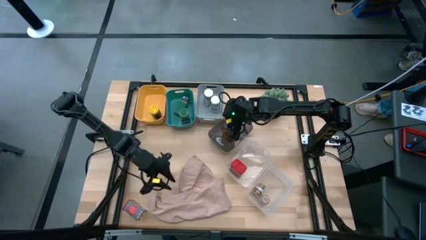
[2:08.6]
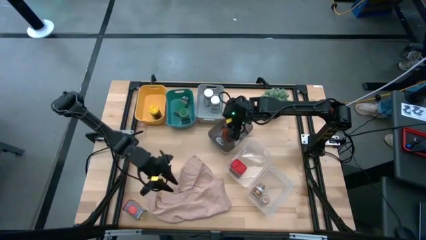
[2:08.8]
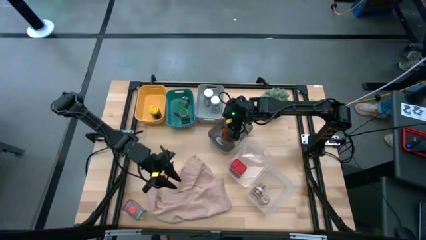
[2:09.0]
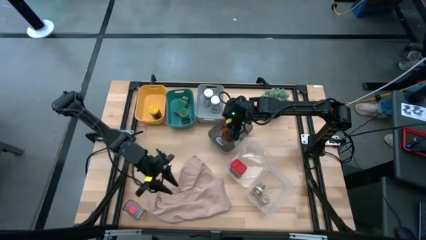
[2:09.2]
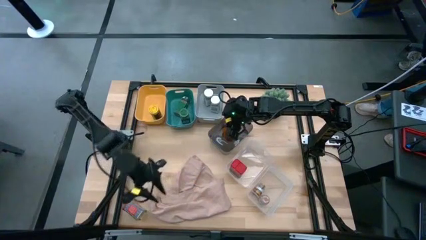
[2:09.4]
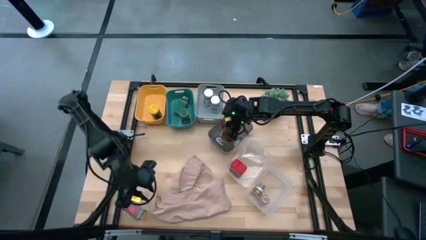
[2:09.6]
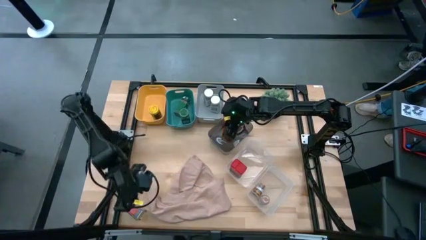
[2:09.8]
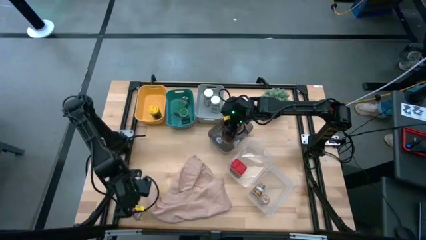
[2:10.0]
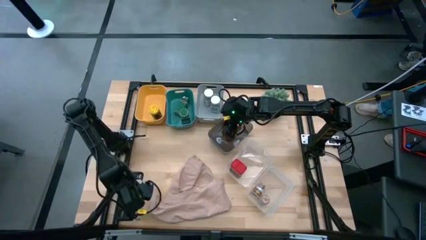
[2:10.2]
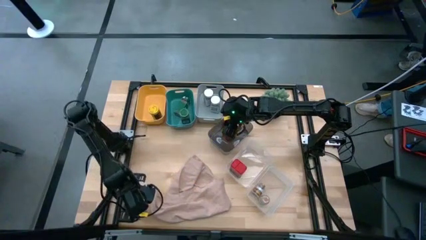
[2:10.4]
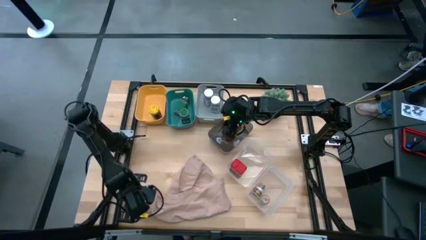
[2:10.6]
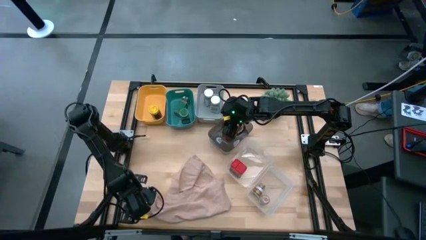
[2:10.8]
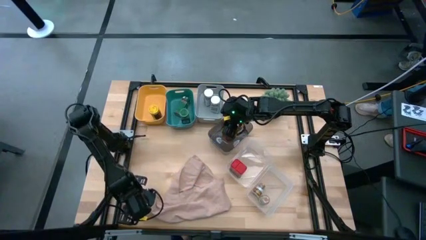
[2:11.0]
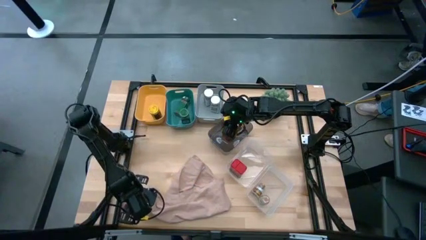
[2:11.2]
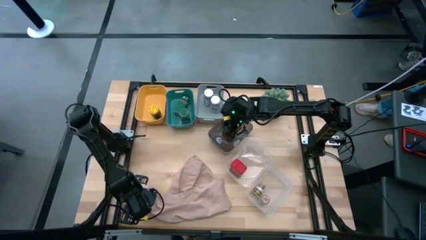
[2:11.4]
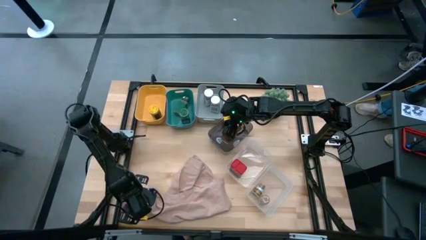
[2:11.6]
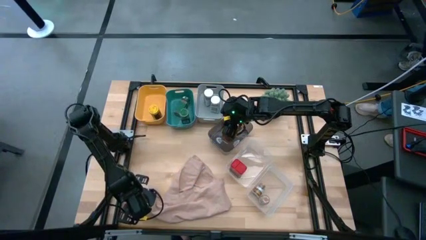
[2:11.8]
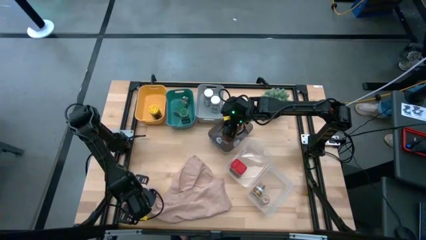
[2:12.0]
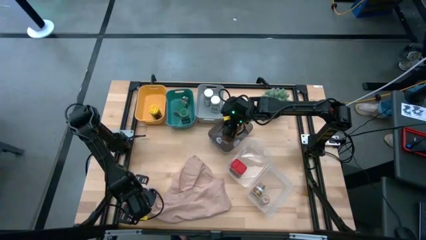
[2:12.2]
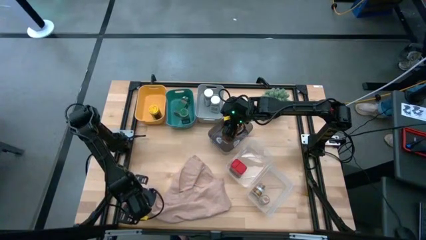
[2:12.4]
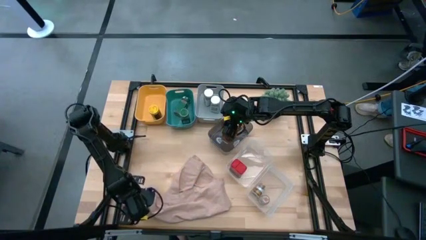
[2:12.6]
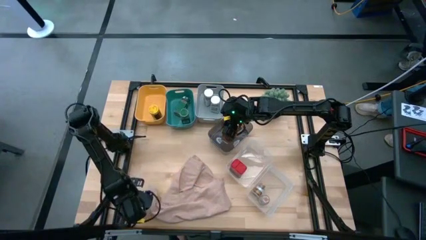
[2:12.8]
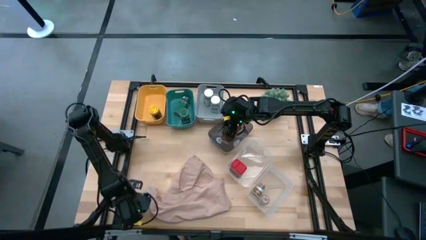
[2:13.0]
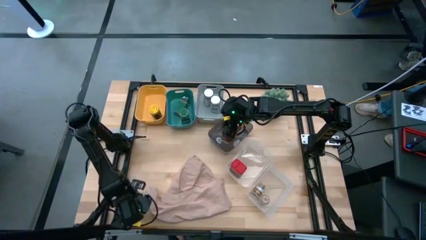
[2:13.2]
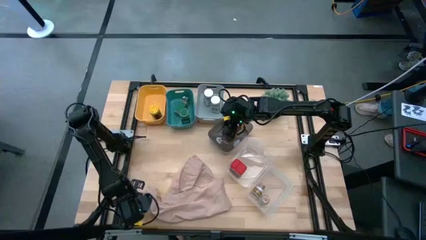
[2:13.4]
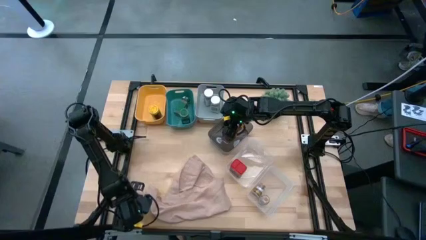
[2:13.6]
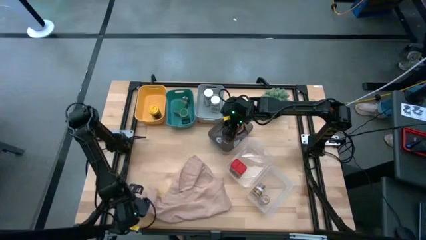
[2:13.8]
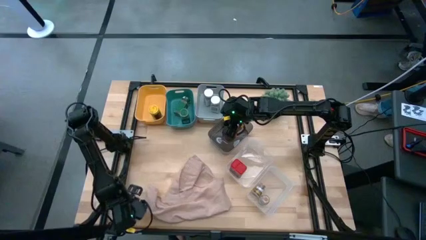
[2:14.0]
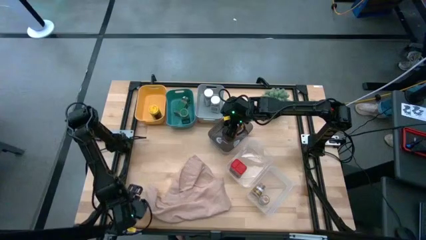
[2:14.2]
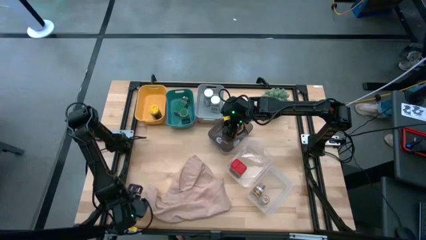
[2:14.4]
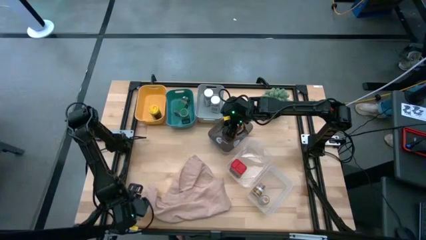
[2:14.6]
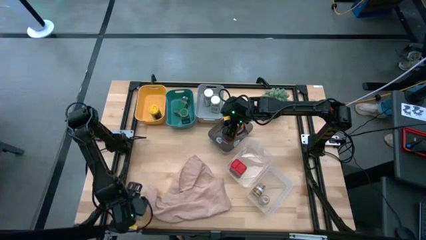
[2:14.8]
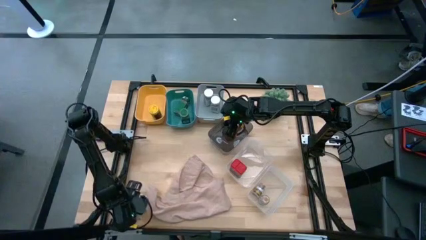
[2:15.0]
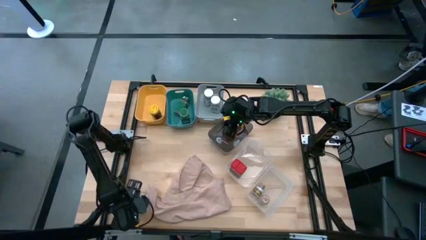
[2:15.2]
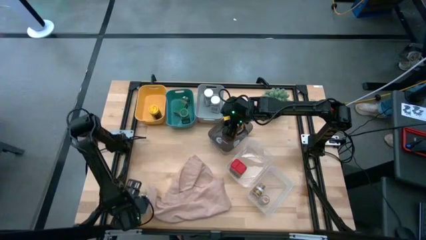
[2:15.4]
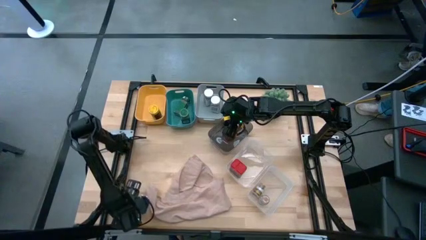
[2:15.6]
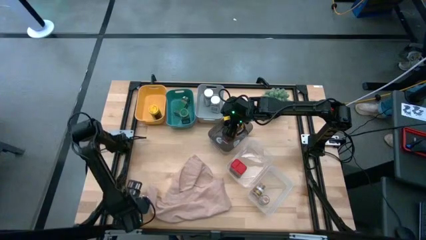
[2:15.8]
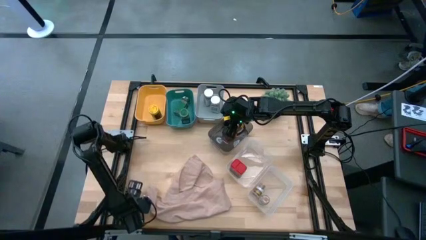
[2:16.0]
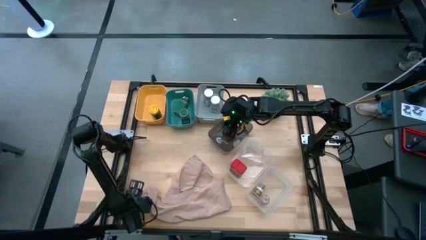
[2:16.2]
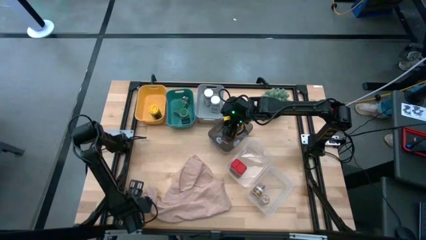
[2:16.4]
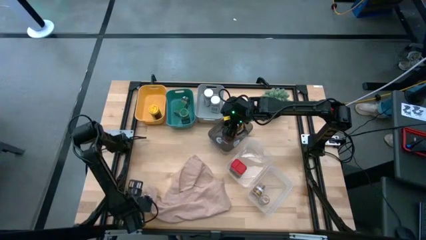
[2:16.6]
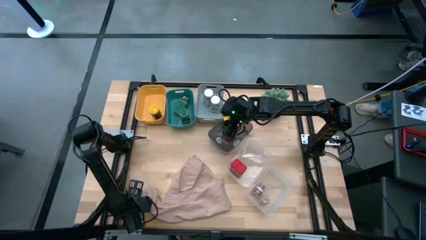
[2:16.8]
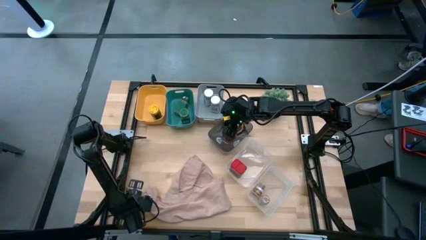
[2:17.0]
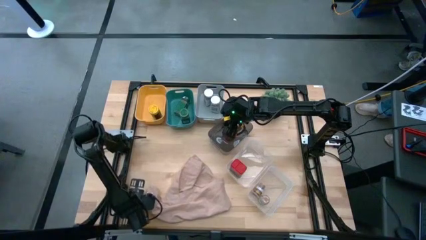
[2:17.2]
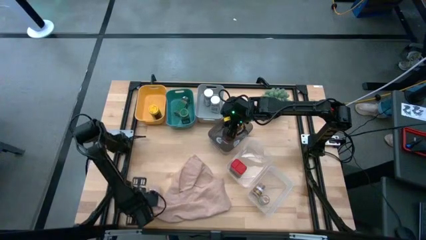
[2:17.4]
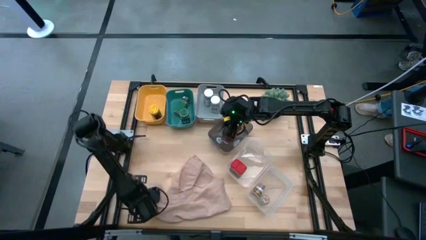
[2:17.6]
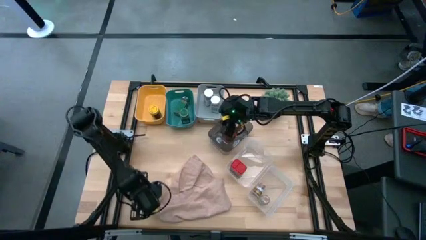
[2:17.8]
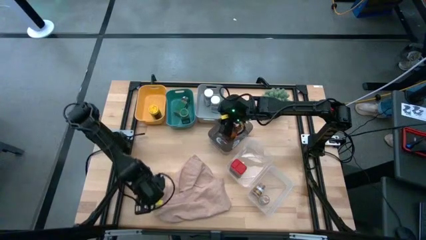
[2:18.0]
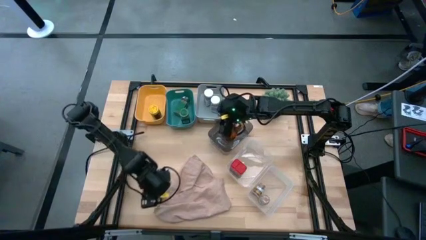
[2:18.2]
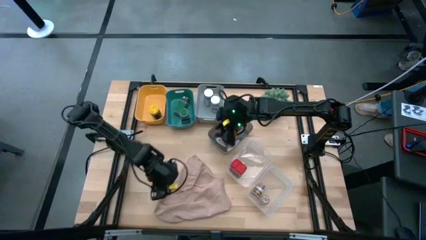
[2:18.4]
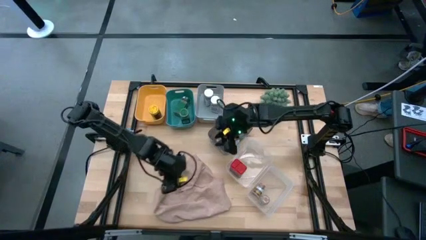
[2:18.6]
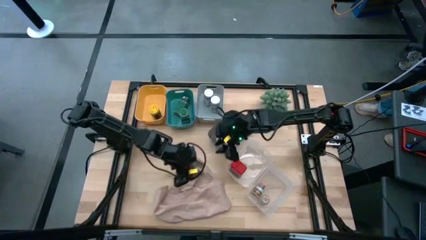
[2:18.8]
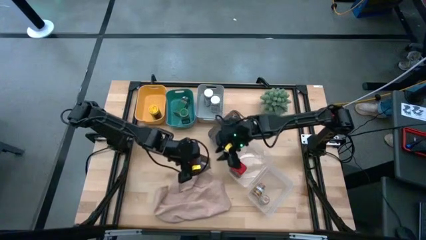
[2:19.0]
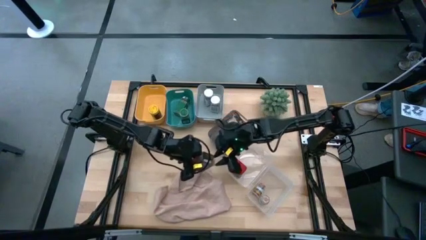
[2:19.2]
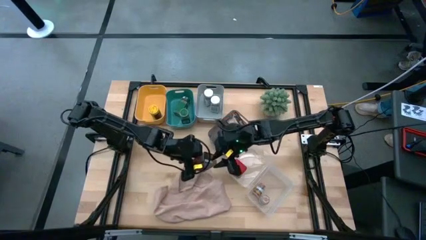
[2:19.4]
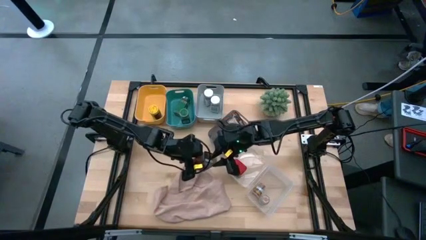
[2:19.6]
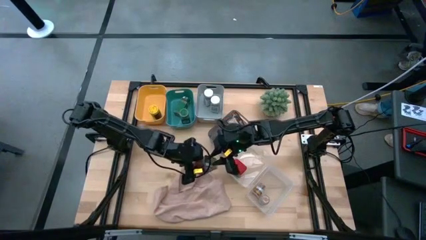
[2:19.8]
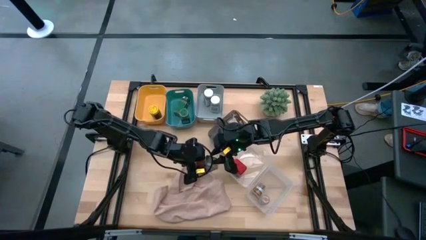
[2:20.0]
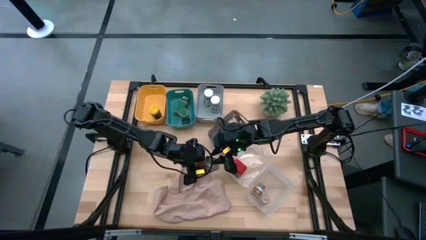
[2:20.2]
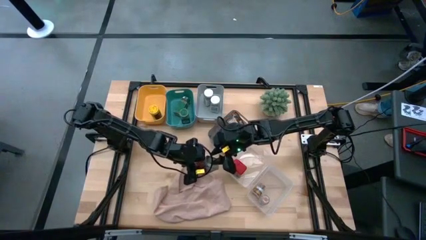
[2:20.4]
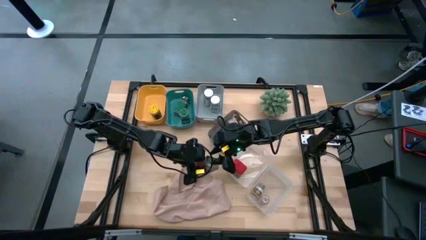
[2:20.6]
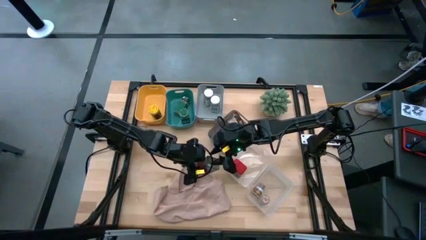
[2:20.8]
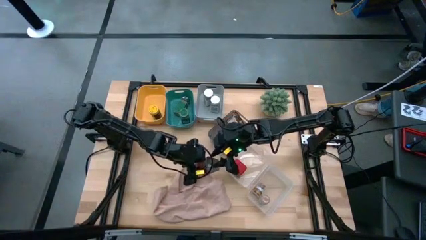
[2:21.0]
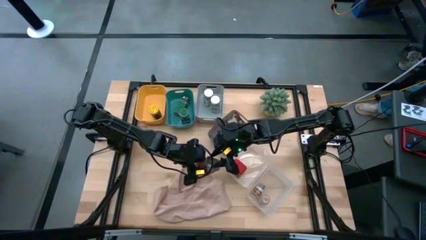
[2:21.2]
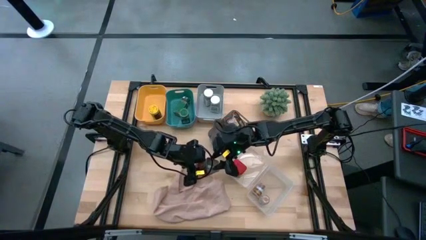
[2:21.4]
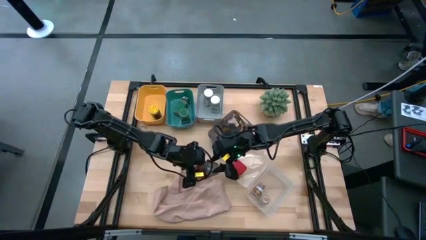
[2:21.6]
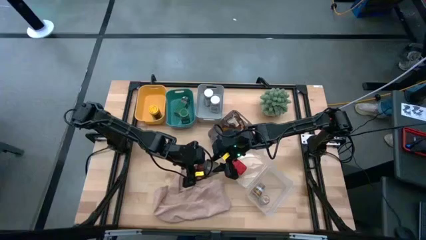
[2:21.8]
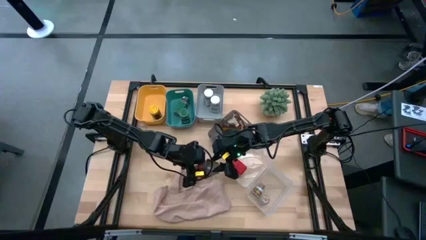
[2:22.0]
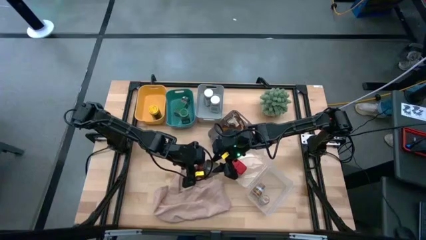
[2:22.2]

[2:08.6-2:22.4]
Task: Sort spices by type
Put the red seasoning can into the left transparent bin
